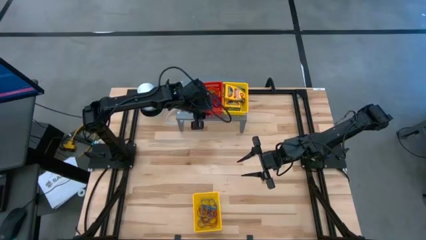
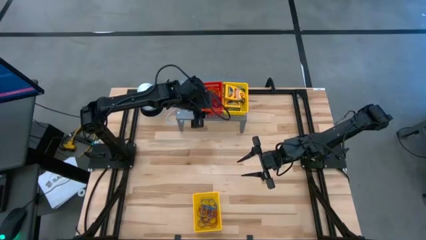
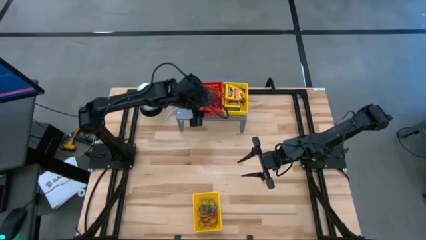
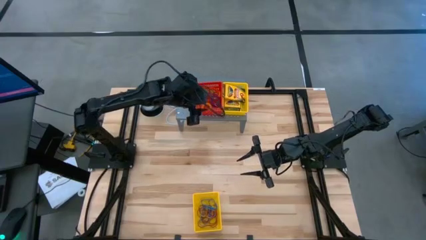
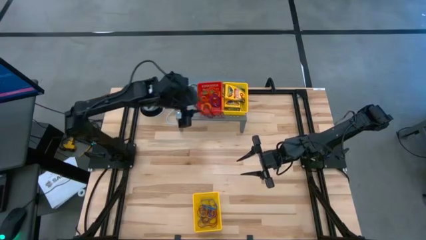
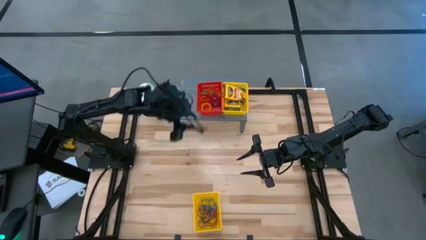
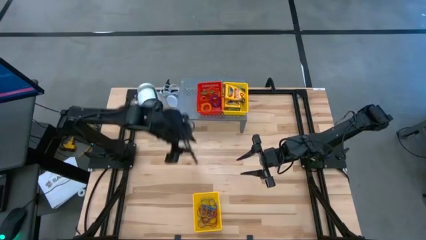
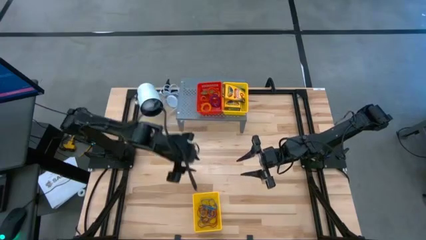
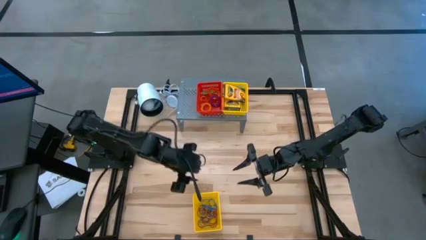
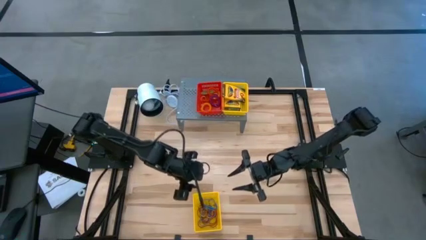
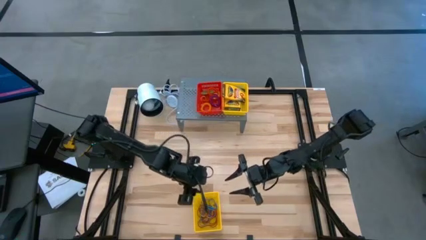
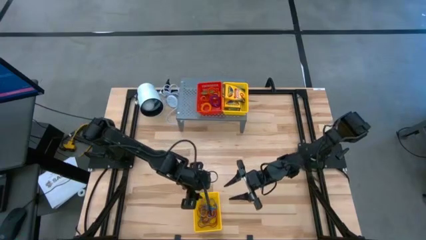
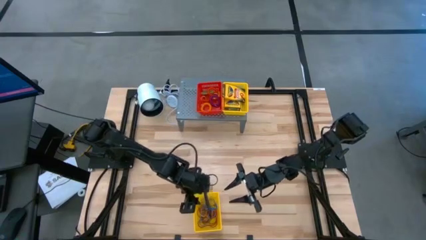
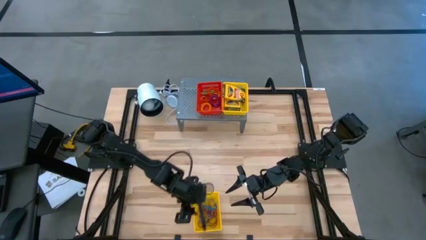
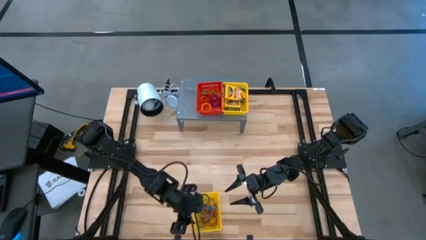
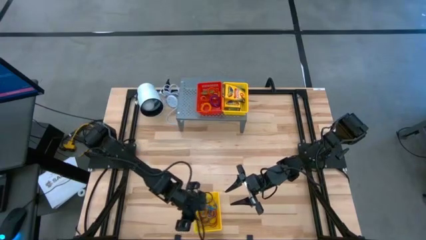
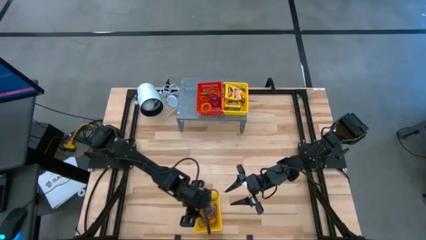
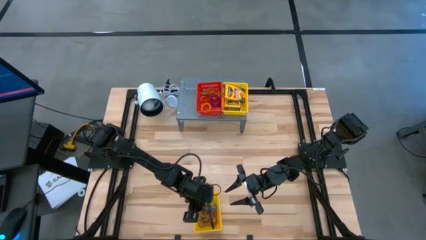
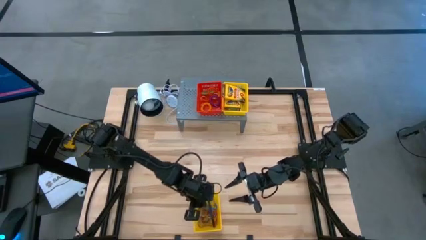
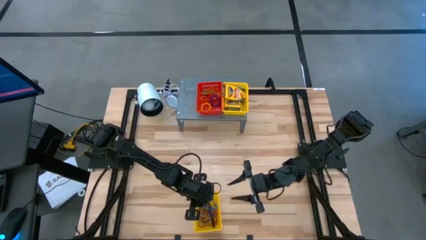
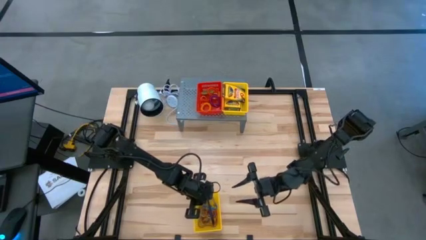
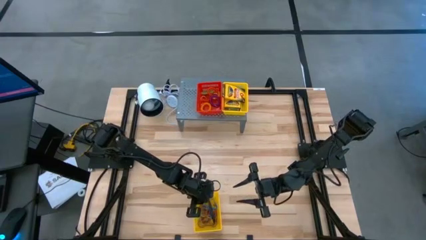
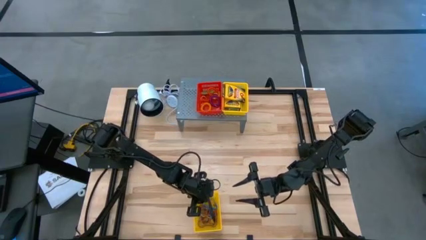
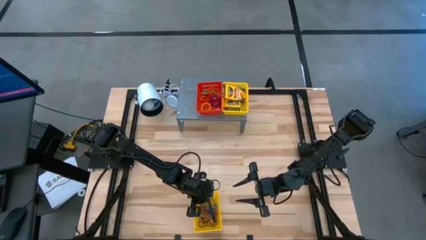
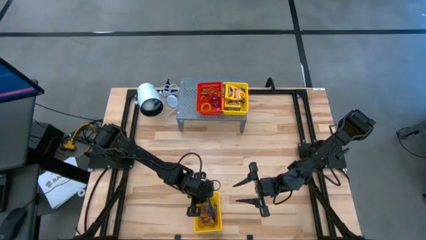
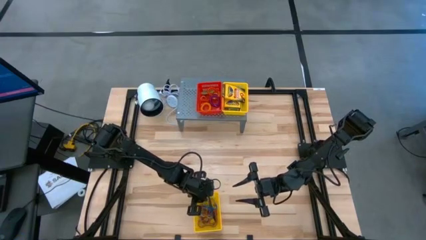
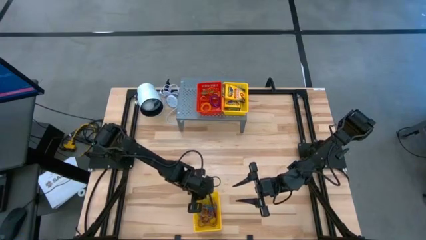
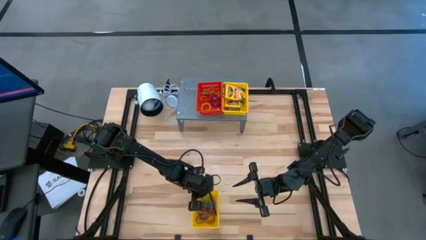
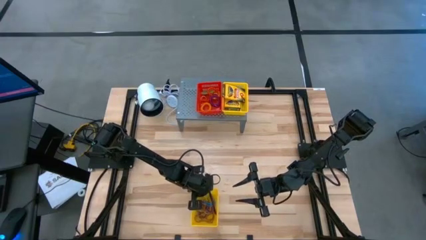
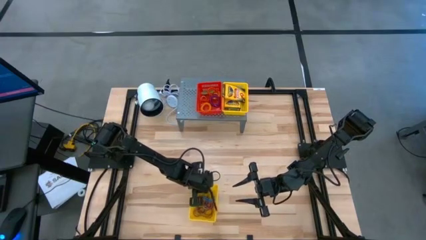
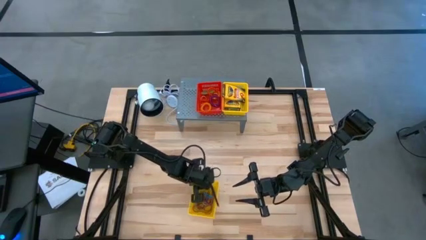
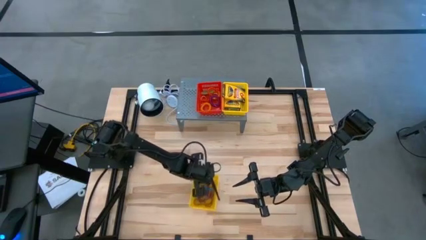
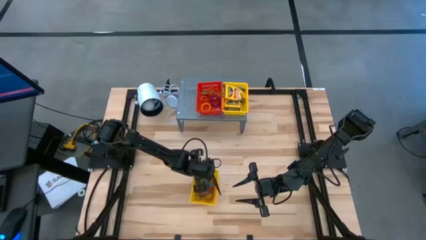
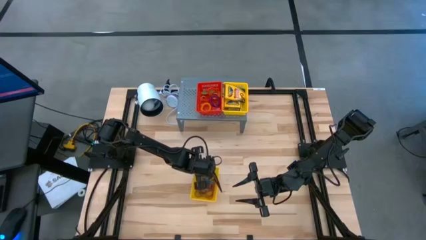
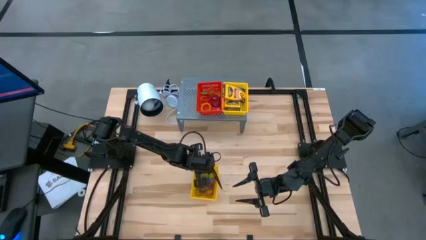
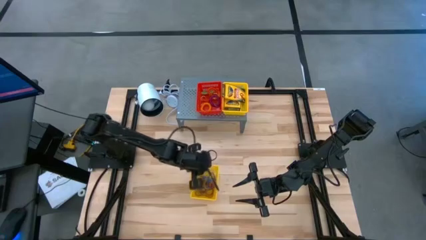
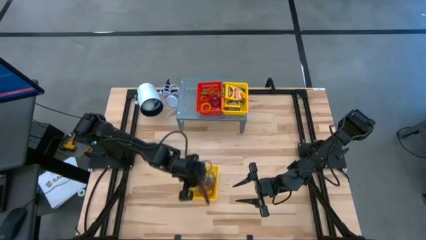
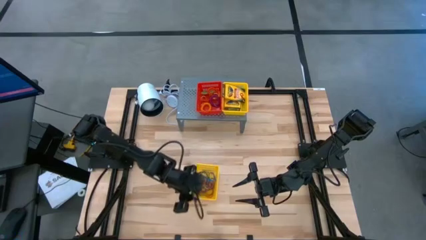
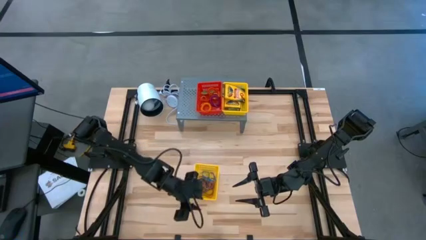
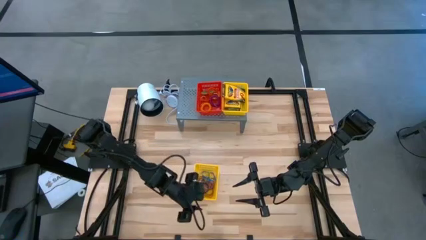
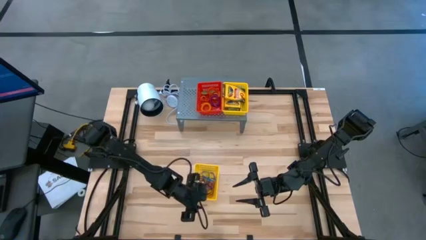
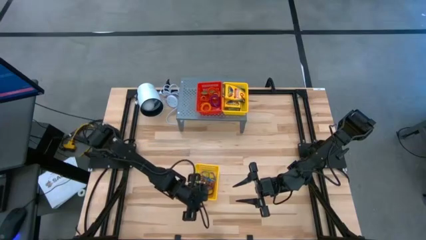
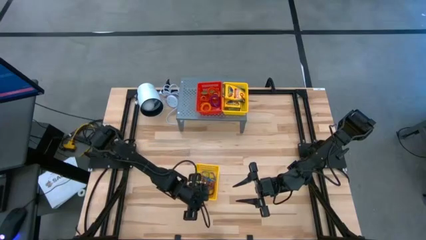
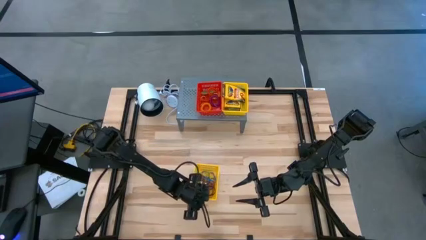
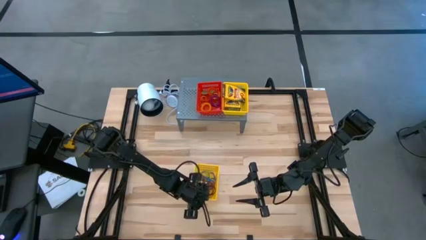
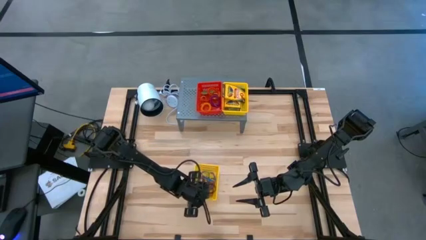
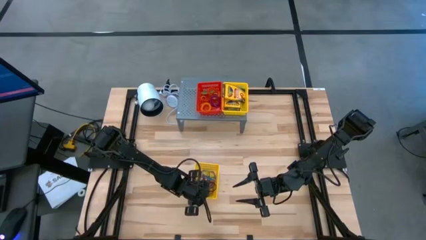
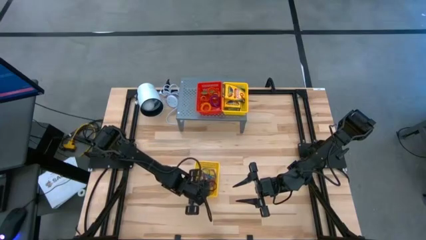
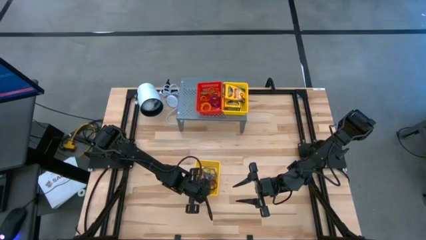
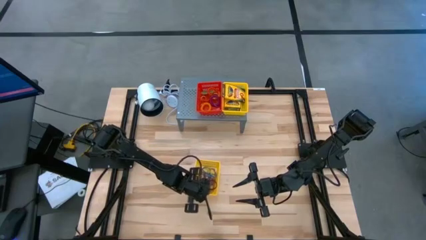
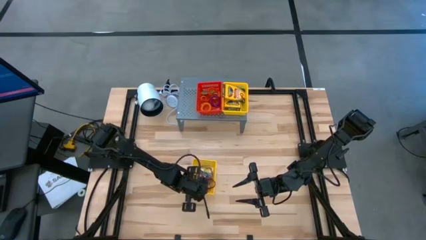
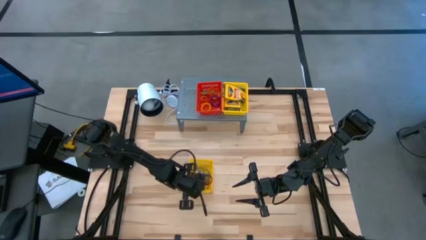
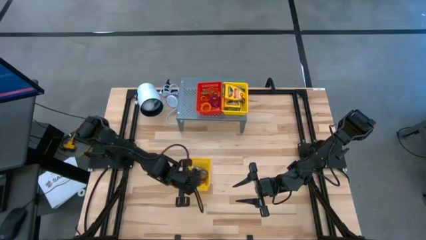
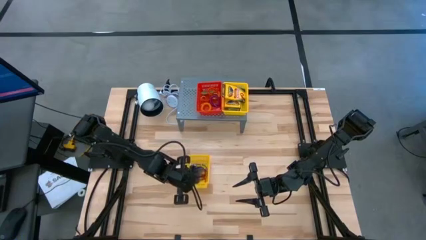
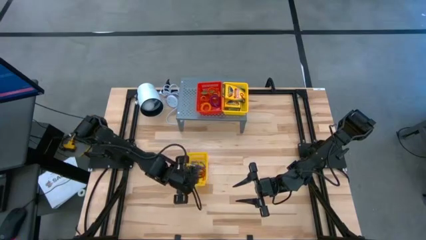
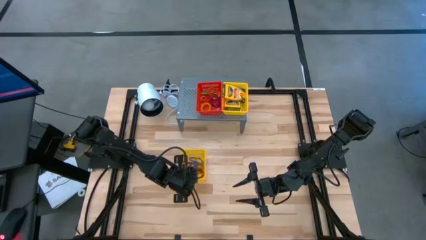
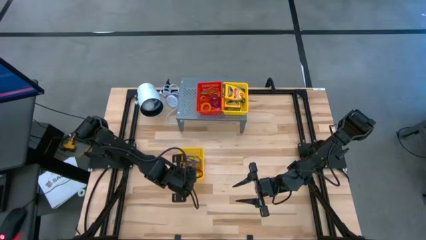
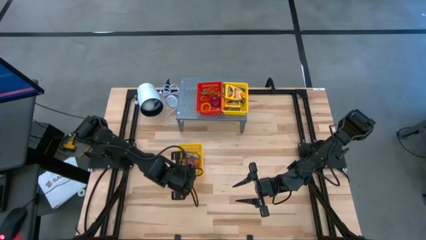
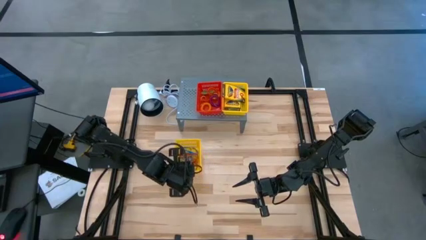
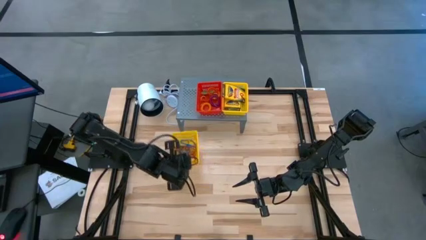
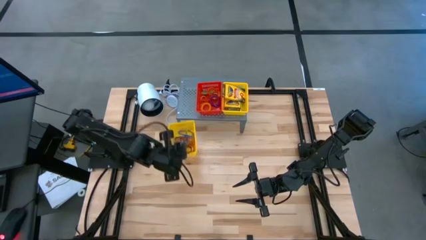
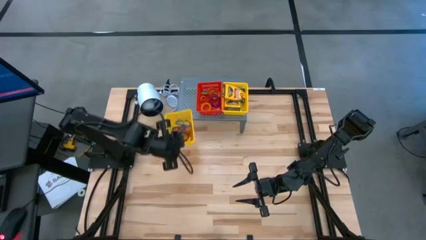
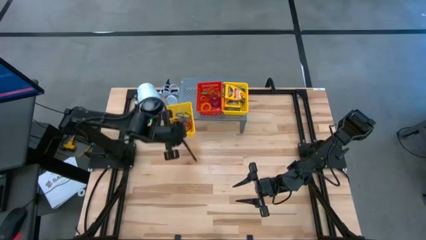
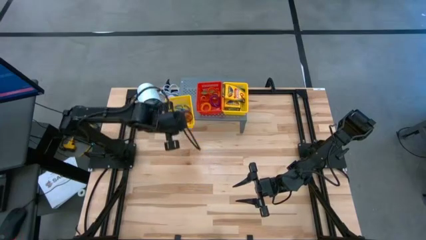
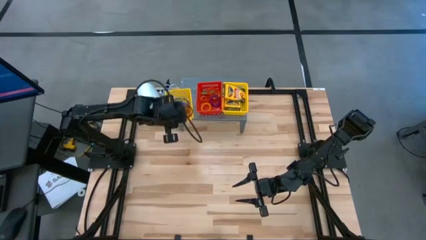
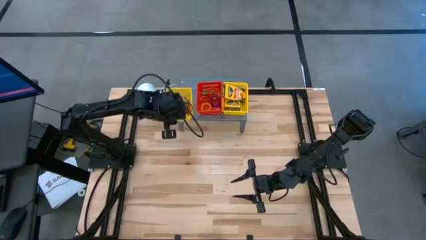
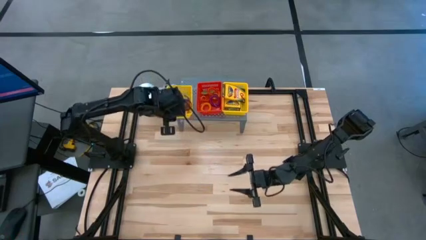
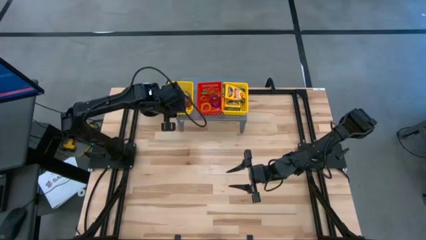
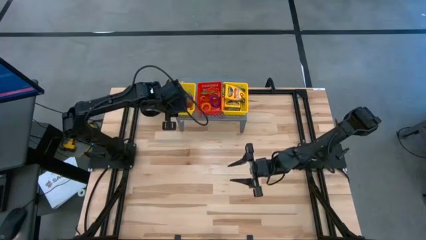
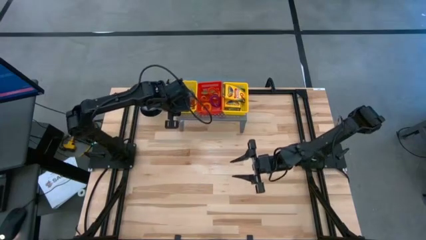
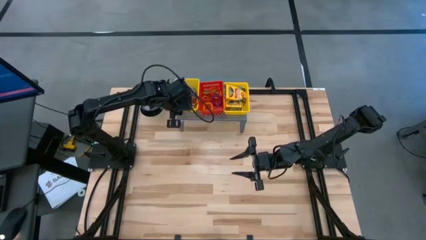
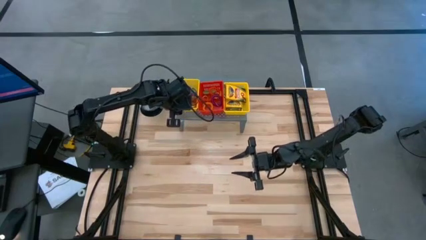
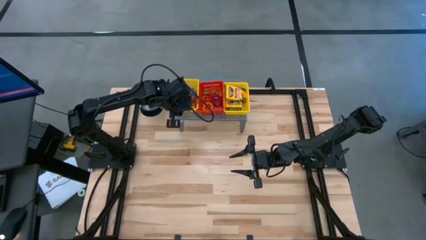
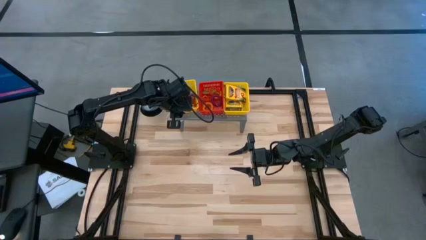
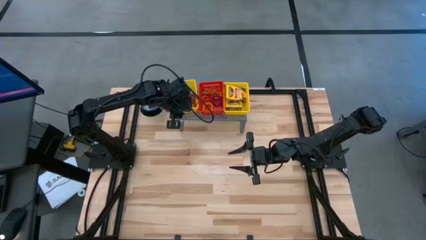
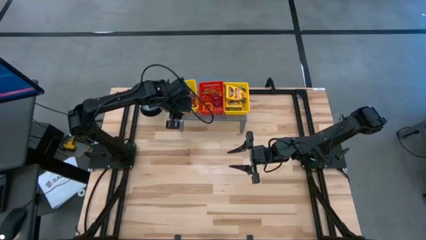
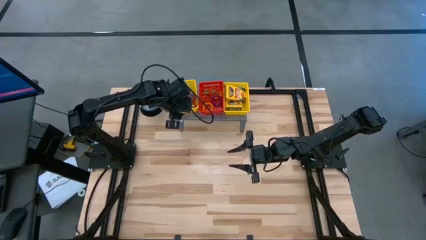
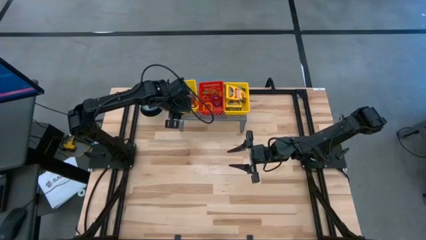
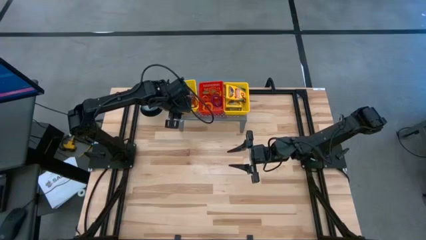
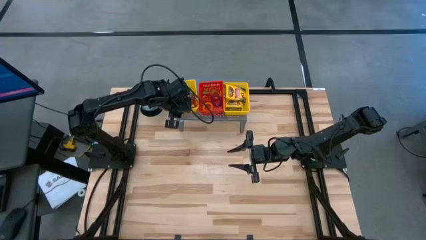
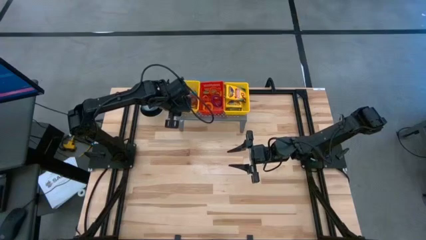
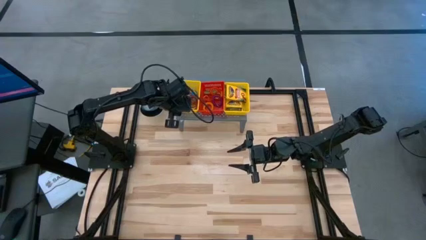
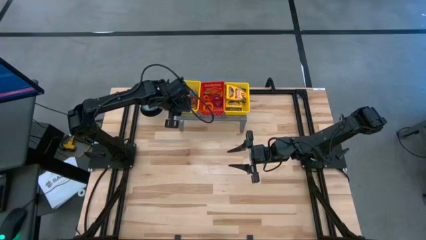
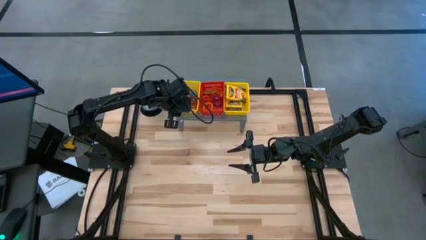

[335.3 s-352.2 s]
Task: Pick & Place Office Desk Supplies
Put the yellow bin on the shelf
